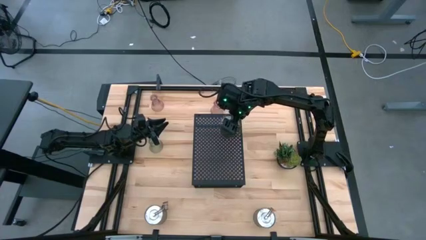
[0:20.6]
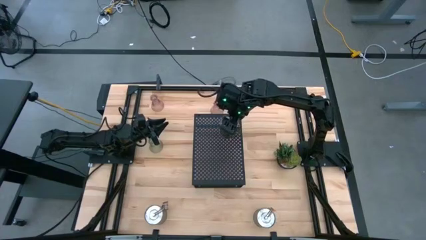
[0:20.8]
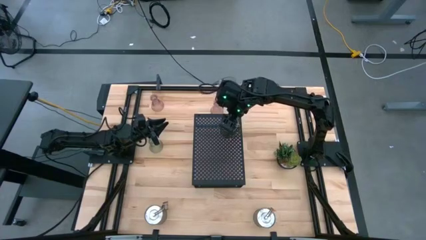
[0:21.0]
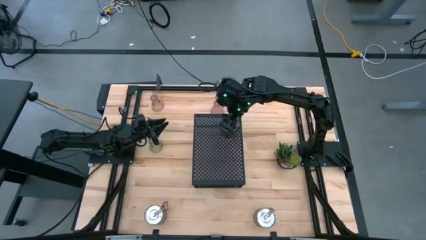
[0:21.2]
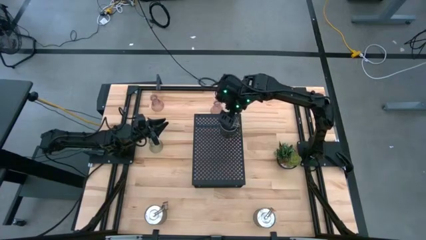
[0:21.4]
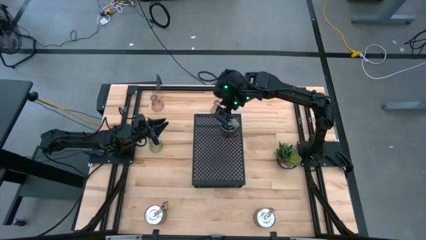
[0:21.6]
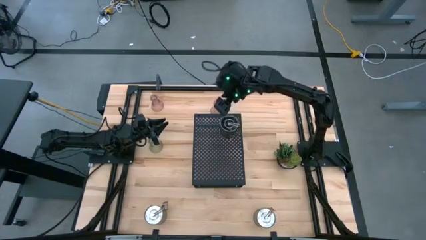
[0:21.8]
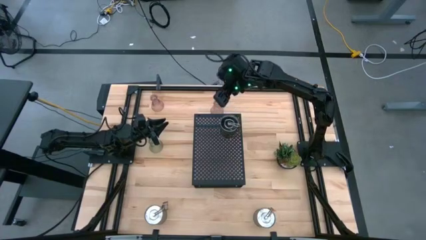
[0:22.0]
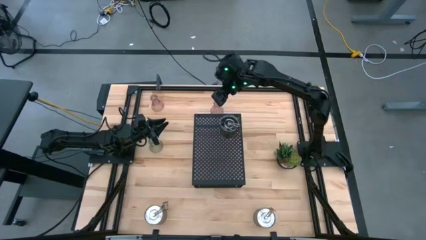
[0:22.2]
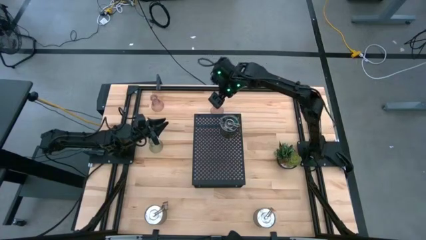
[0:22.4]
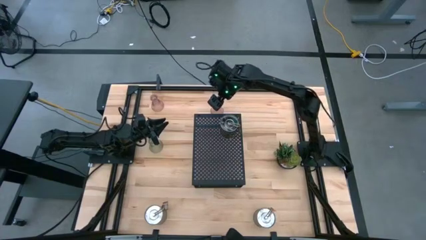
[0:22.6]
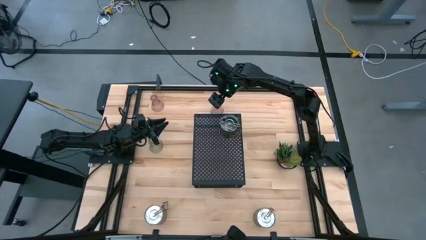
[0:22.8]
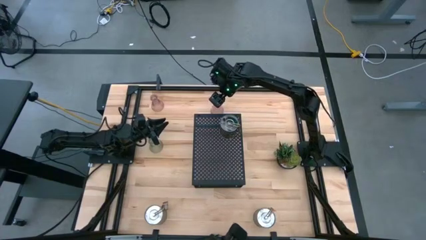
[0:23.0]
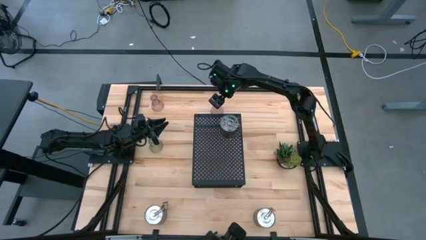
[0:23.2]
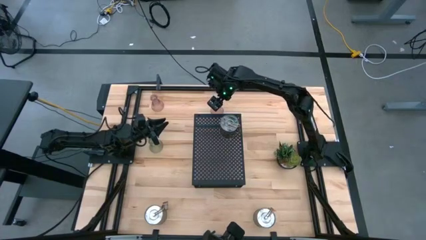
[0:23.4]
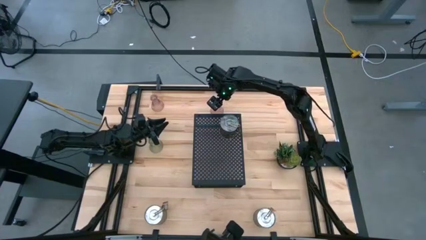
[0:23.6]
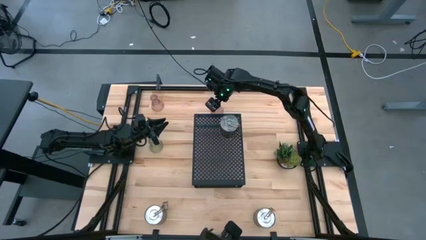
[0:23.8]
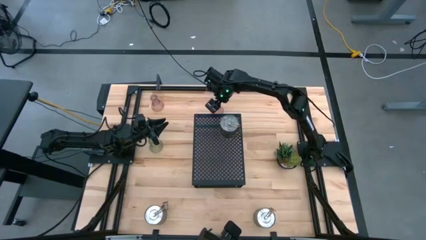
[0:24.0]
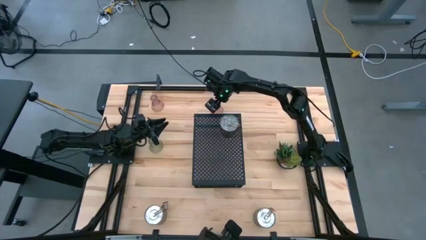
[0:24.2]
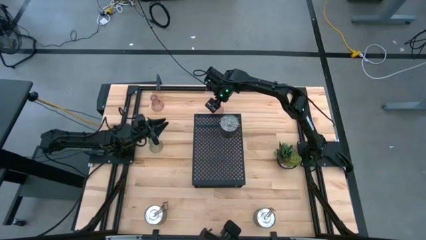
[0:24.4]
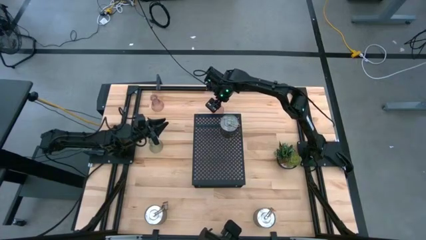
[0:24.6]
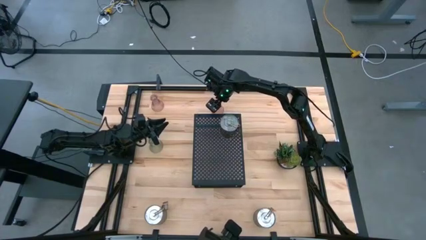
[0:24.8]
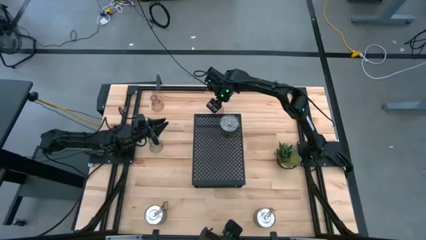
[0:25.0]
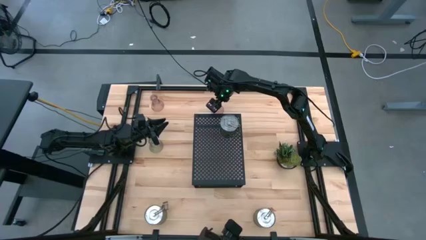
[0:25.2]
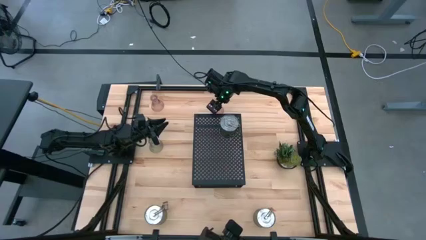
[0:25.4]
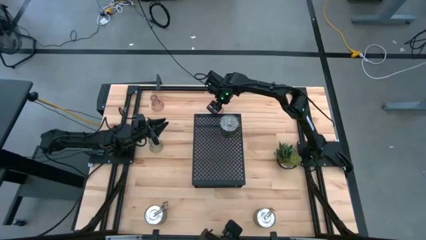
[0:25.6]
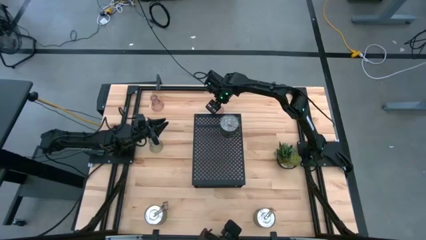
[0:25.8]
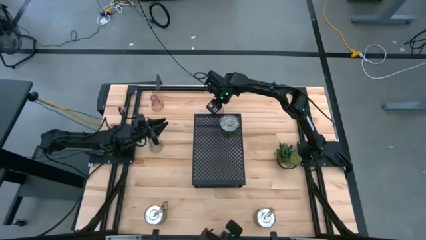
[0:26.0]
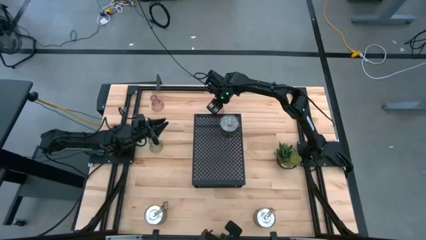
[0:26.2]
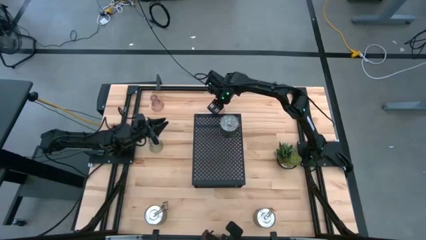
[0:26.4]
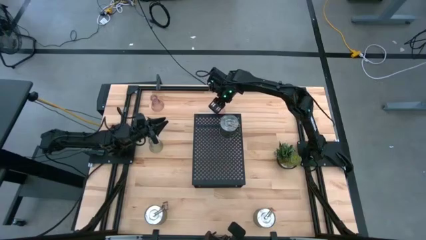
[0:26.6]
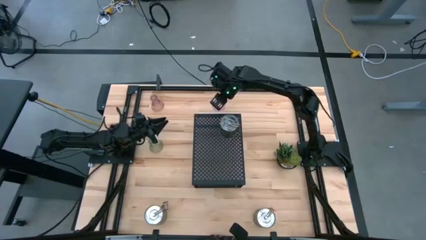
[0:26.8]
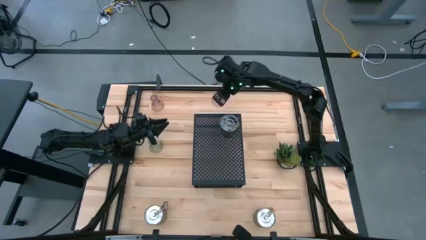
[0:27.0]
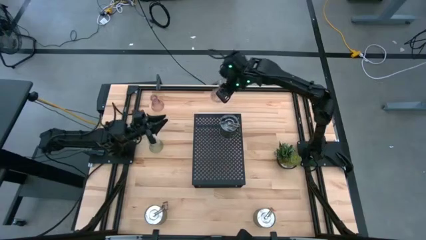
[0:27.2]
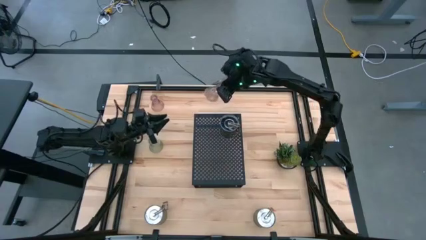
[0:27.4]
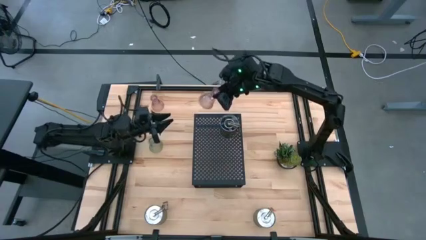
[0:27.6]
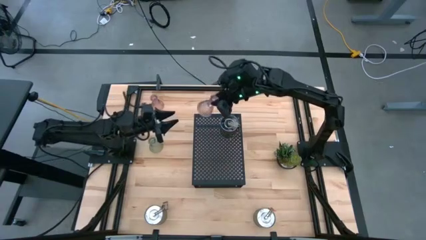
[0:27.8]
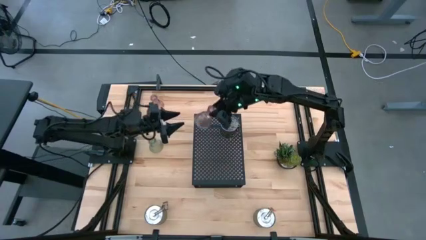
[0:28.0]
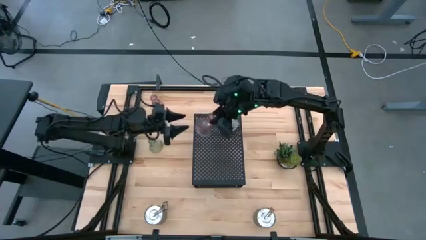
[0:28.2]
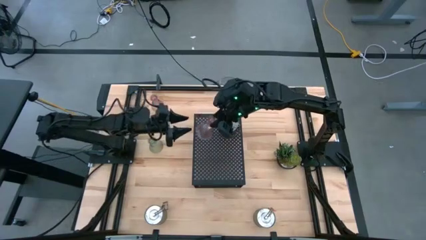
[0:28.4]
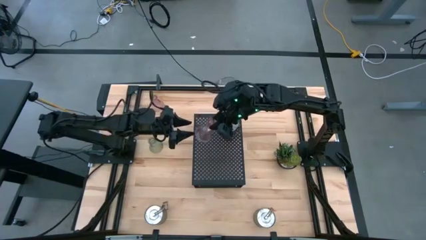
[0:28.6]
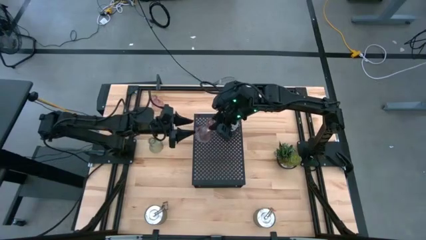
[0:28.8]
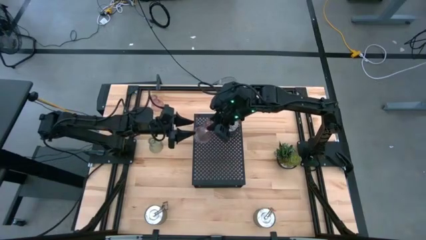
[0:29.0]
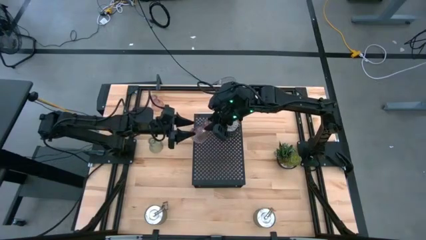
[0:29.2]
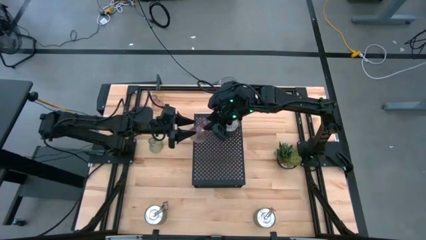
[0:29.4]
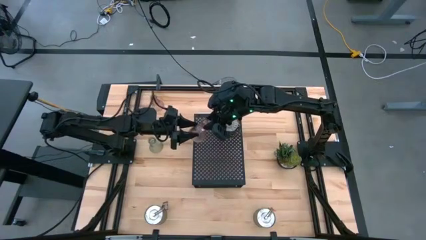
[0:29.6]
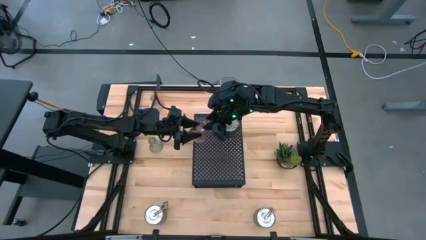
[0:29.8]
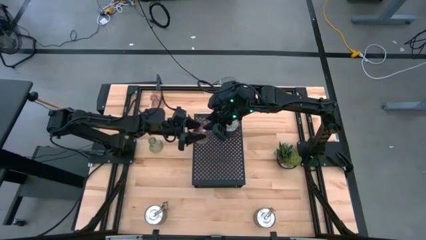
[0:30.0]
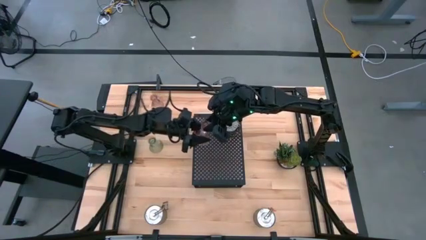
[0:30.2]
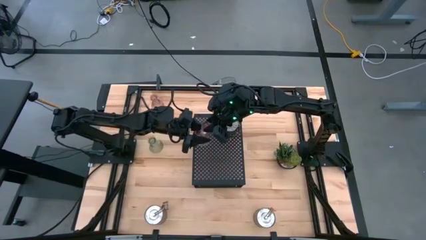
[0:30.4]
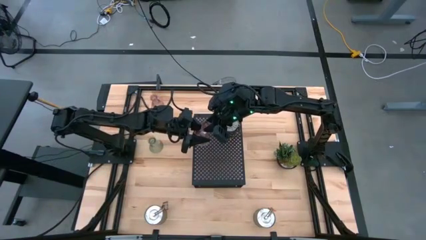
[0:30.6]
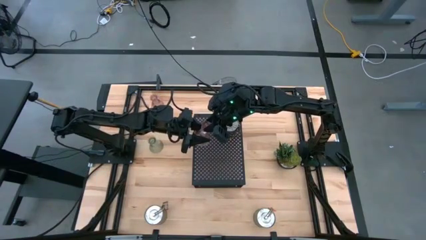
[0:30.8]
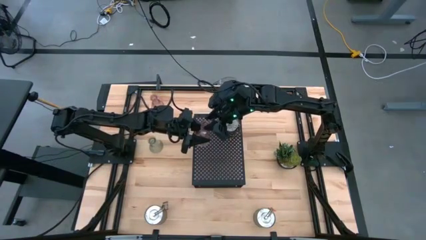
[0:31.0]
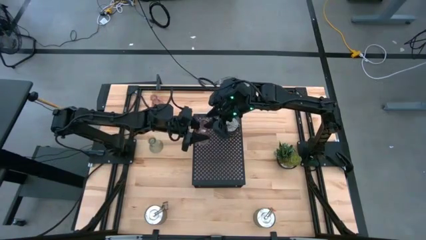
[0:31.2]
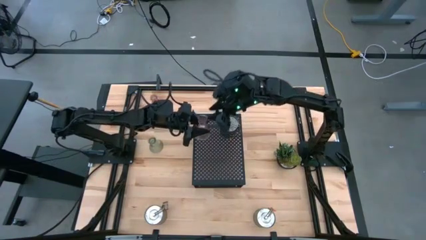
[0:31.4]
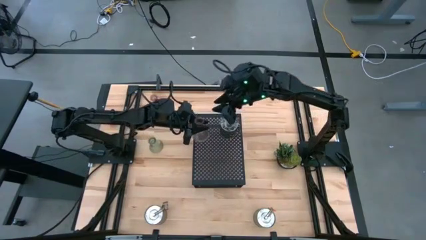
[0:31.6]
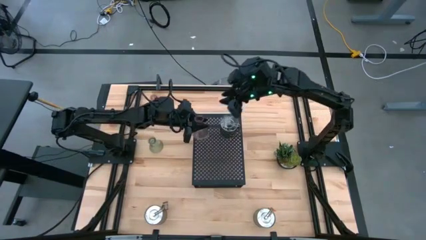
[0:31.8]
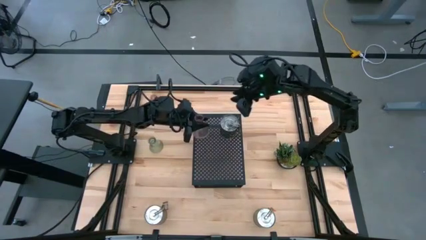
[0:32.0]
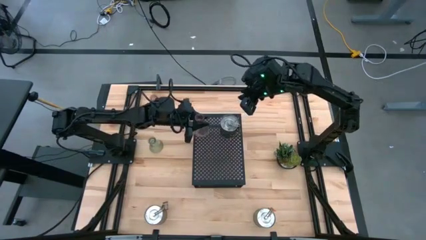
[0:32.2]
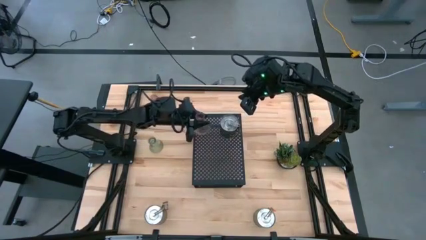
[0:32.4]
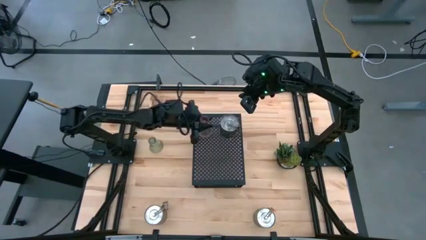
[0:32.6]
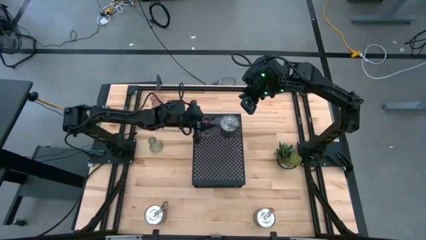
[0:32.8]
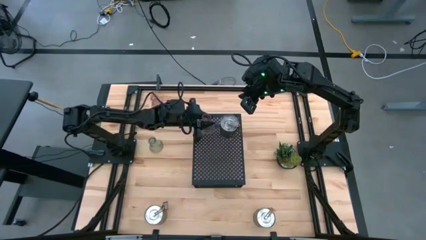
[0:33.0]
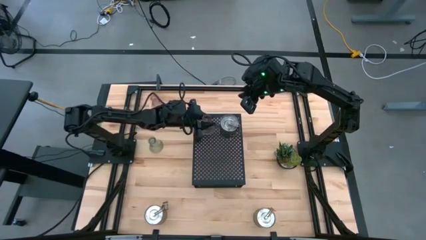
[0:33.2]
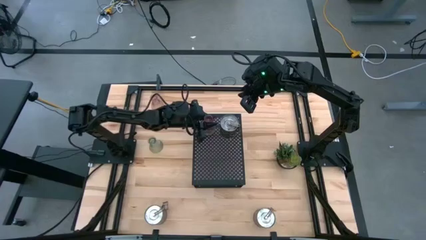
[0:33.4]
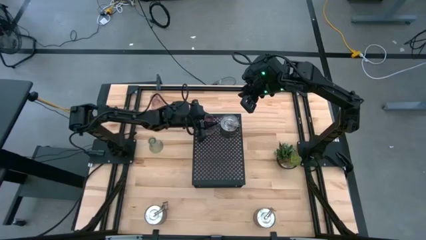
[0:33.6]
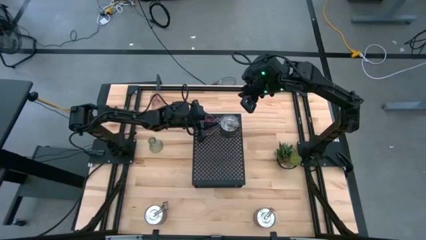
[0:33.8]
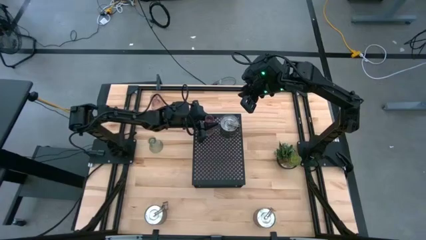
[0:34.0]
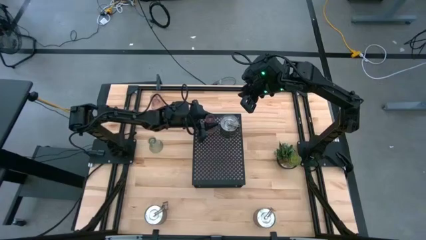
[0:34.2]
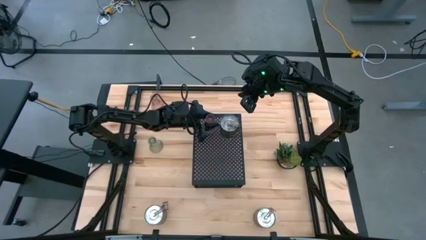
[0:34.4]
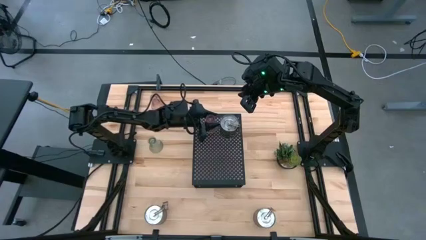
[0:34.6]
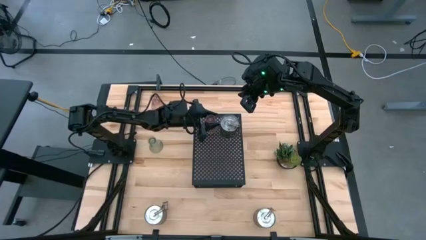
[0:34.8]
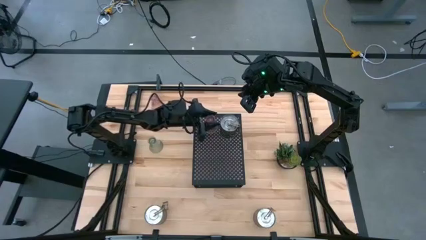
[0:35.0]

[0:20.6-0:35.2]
Task: Pick & Place candle stick holders
Put the right pink candle holder on the shelf

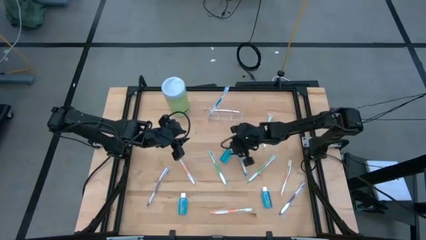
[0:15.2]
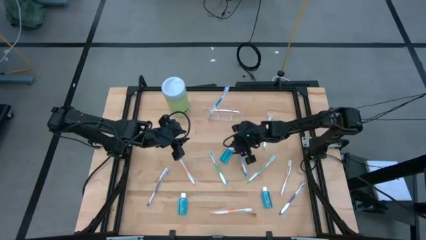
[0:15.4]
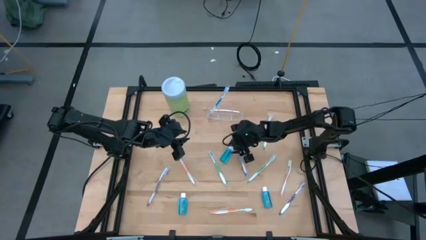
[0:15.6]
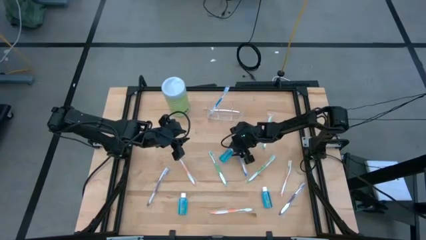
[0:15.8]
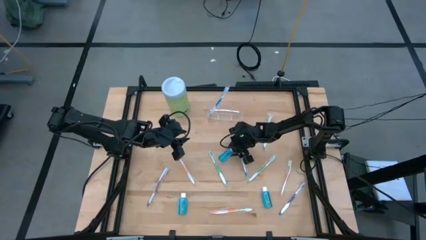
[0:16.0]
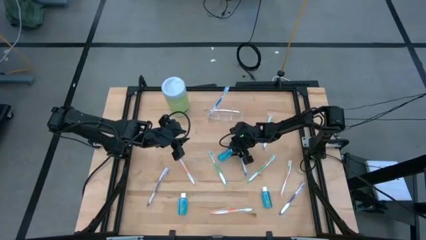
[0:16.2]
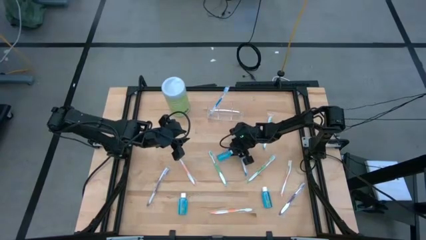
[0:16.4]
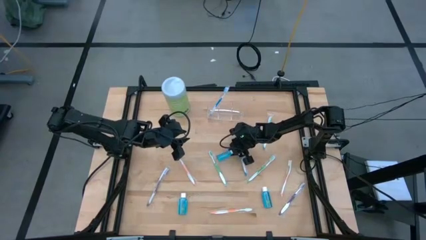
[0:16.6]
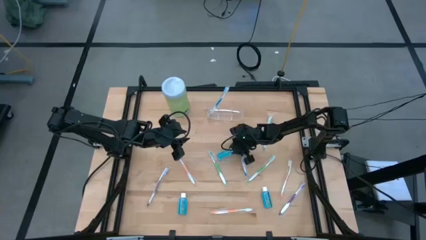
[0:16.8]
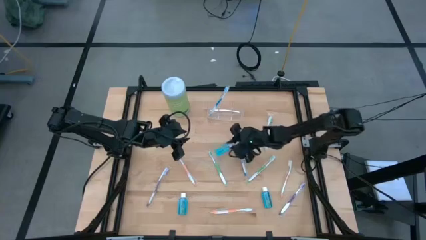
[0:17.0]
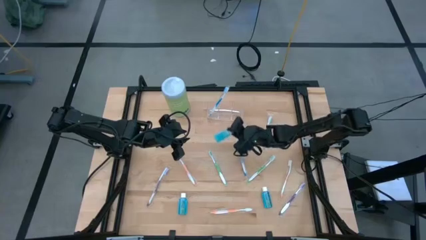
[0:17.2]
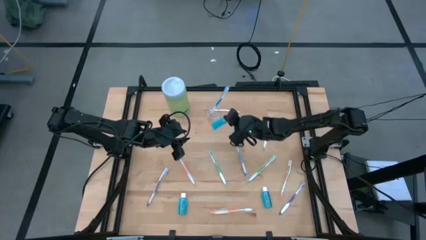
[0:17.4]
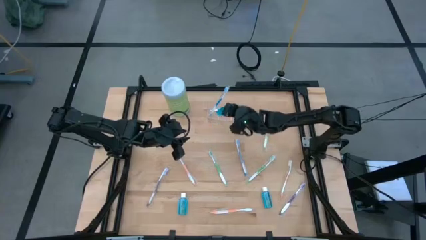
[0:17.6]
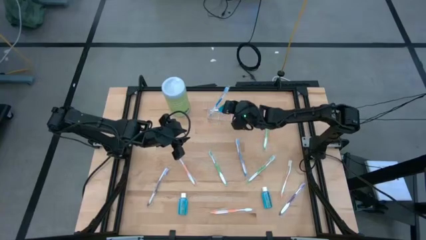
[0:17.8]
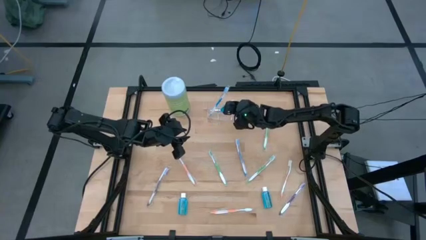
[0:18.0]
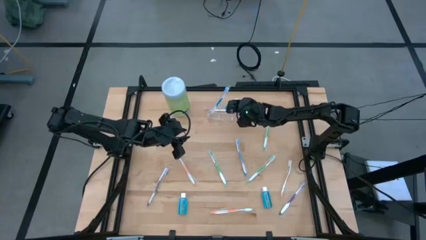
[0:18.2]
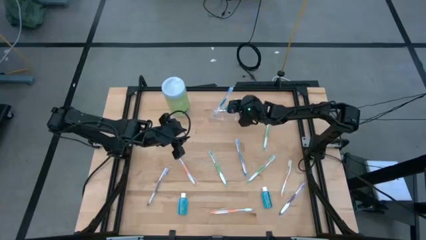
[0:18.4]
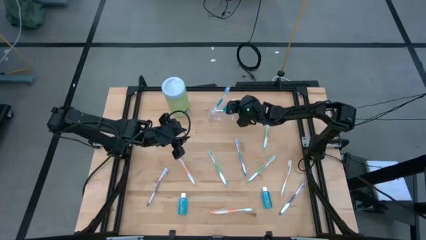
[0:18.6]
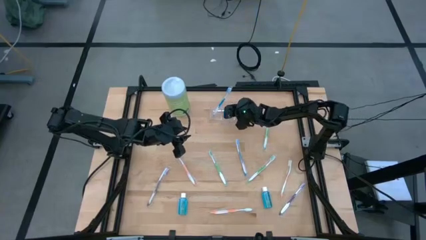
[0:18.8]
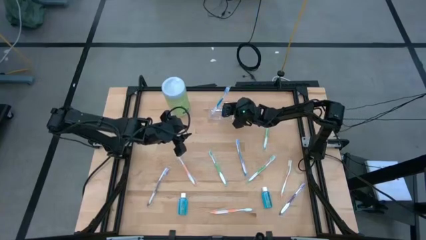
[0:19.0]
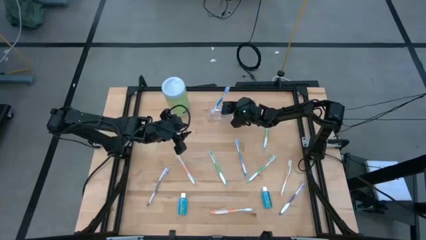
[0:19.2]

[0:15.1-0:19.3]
Task: Pick & Place toothbrushing station
Put the top mouthwash bottle into the transparent organizer
